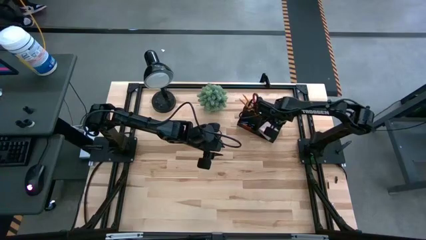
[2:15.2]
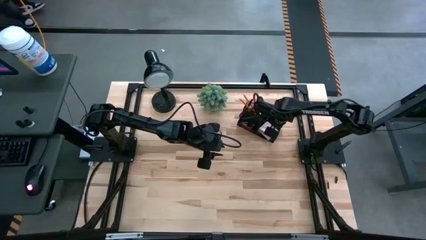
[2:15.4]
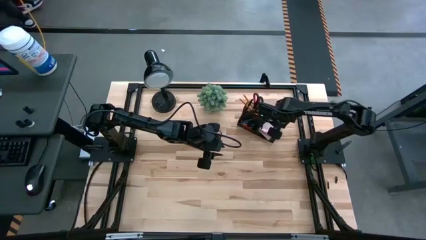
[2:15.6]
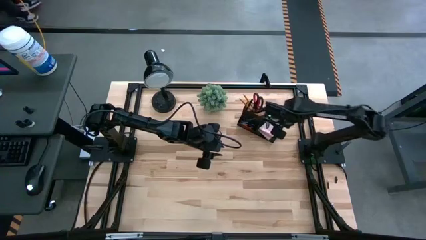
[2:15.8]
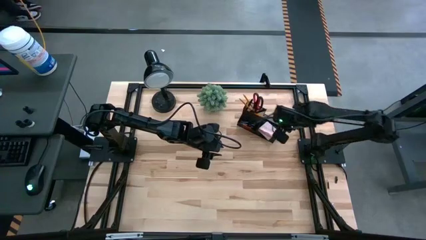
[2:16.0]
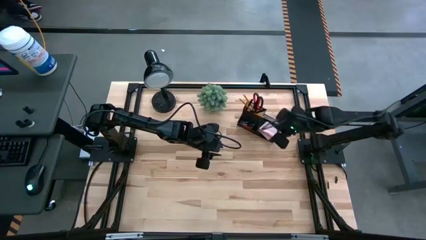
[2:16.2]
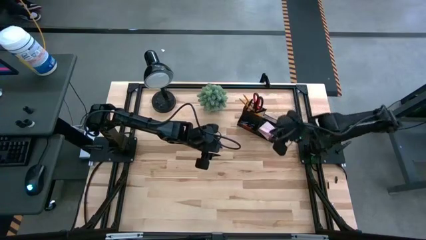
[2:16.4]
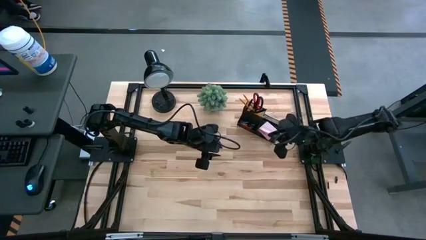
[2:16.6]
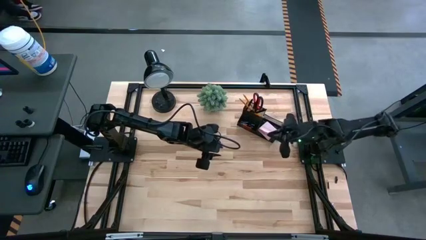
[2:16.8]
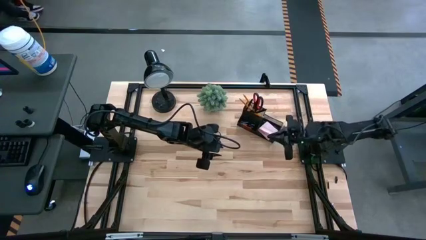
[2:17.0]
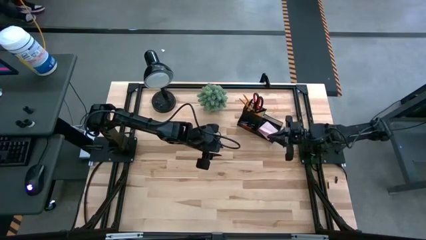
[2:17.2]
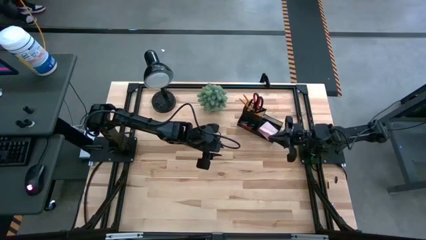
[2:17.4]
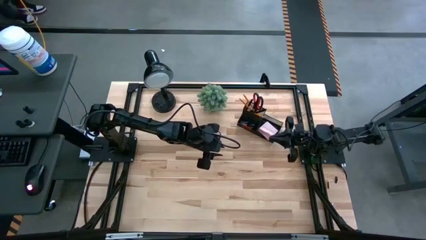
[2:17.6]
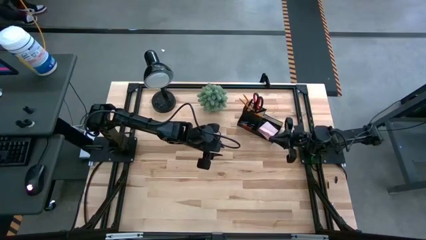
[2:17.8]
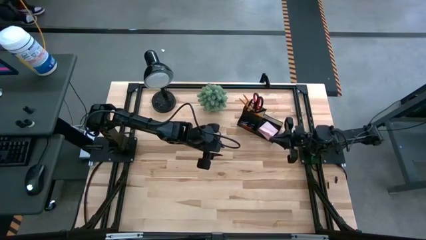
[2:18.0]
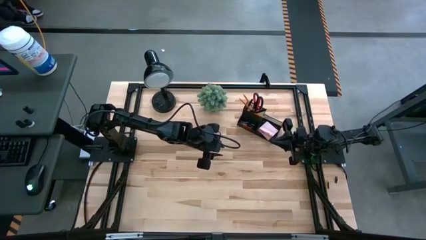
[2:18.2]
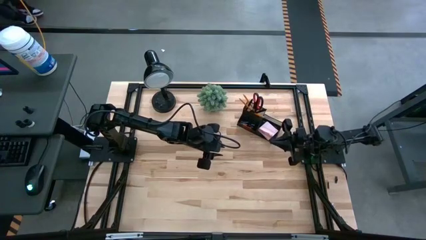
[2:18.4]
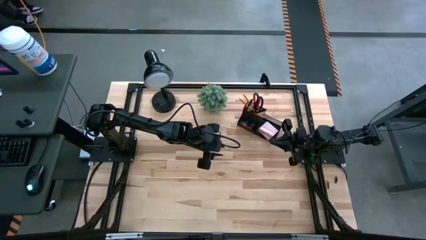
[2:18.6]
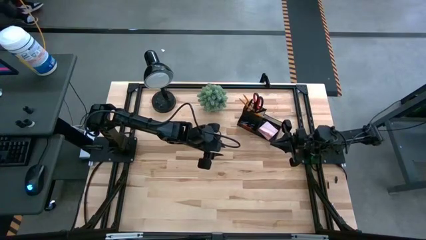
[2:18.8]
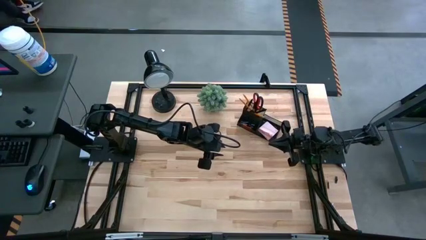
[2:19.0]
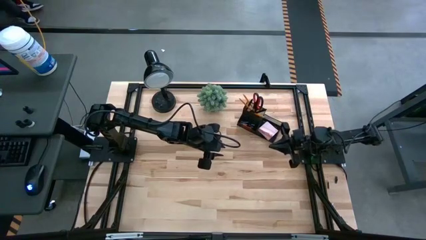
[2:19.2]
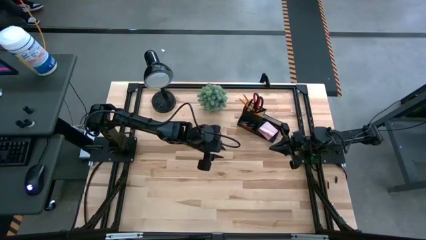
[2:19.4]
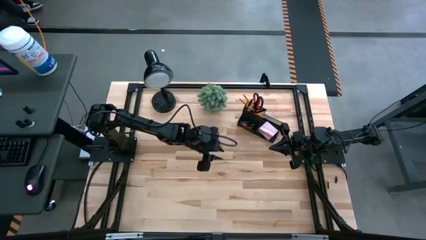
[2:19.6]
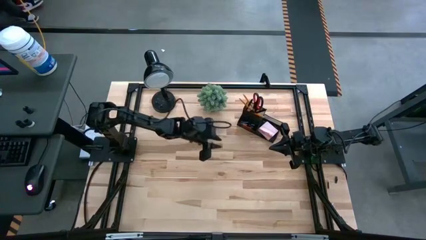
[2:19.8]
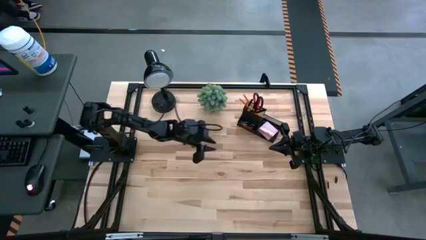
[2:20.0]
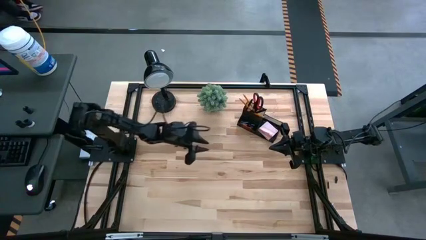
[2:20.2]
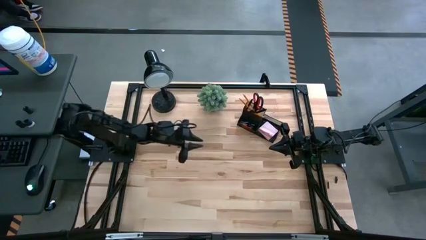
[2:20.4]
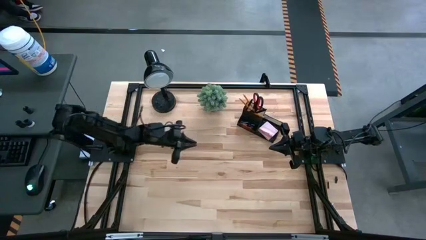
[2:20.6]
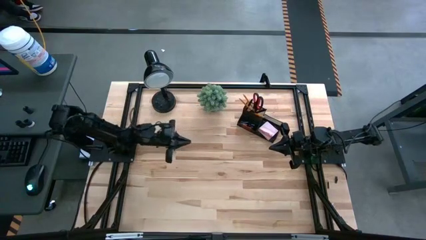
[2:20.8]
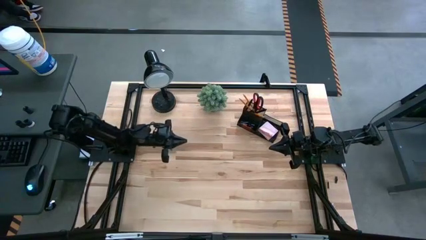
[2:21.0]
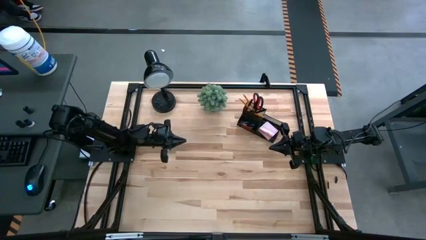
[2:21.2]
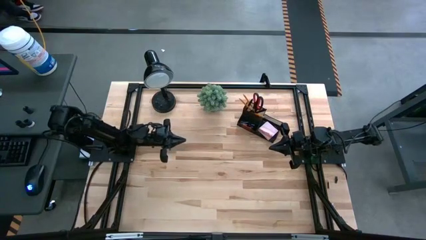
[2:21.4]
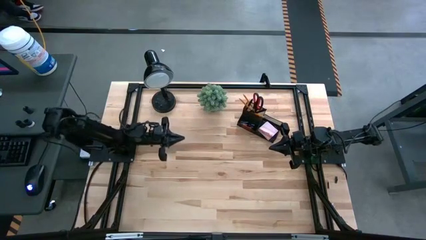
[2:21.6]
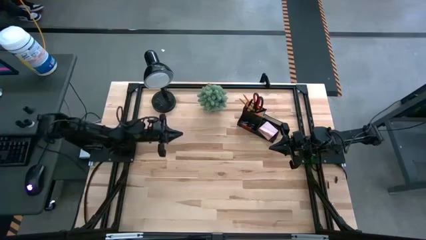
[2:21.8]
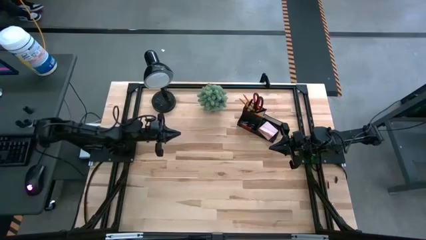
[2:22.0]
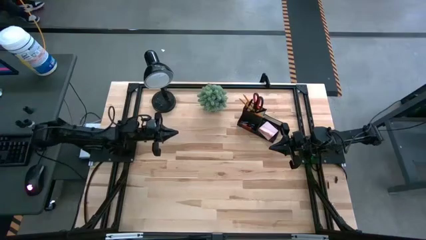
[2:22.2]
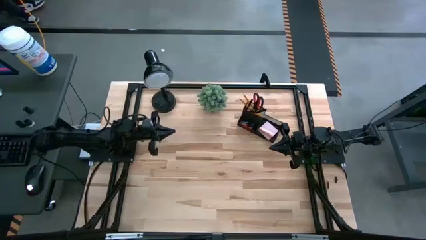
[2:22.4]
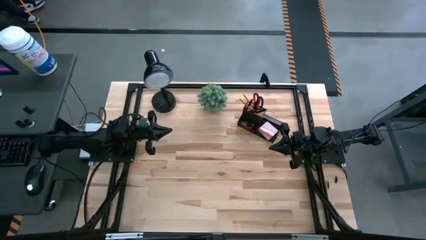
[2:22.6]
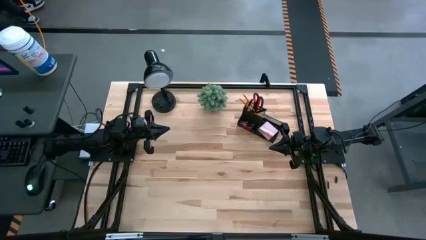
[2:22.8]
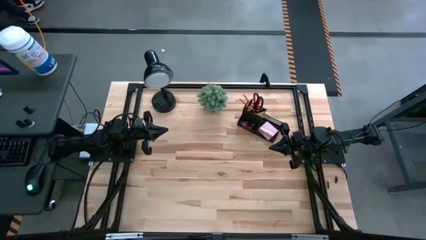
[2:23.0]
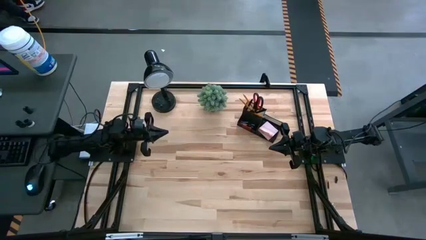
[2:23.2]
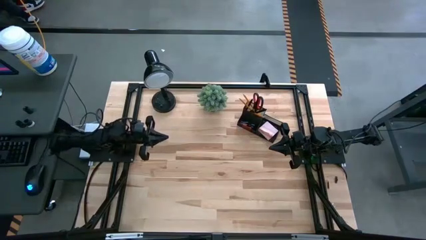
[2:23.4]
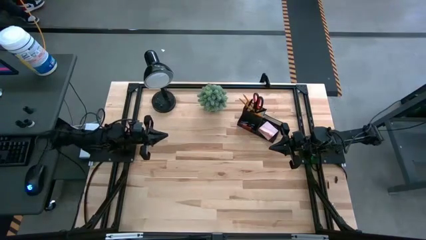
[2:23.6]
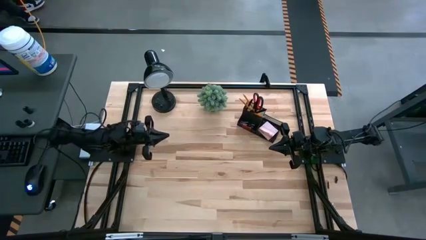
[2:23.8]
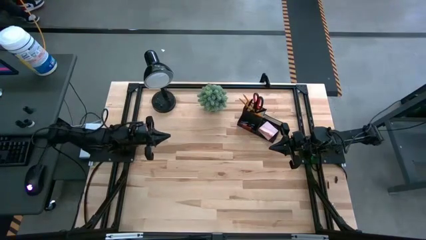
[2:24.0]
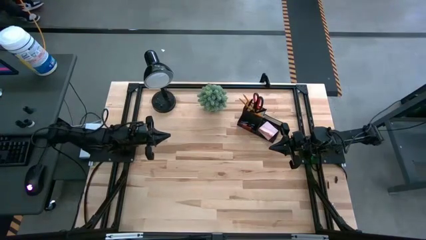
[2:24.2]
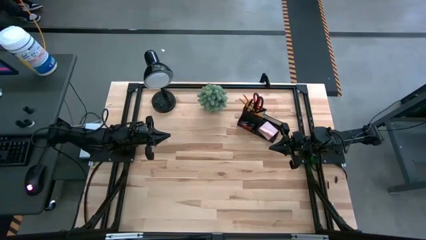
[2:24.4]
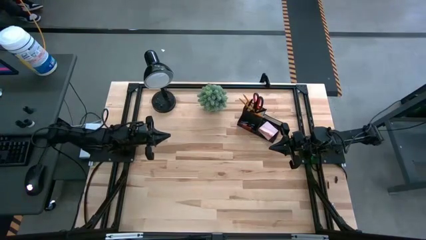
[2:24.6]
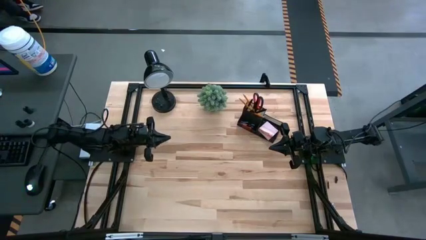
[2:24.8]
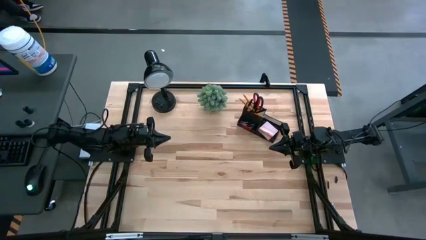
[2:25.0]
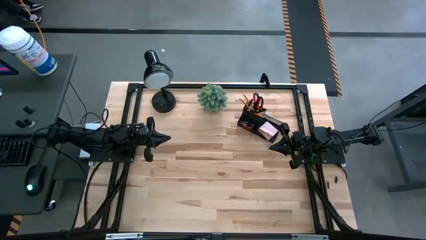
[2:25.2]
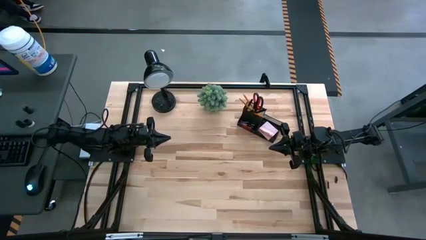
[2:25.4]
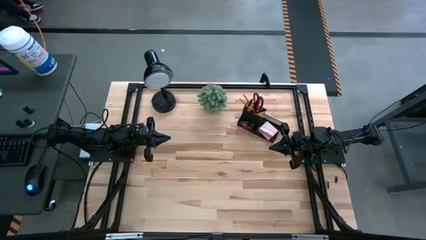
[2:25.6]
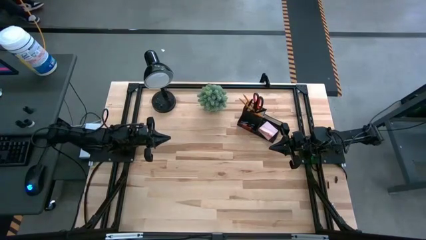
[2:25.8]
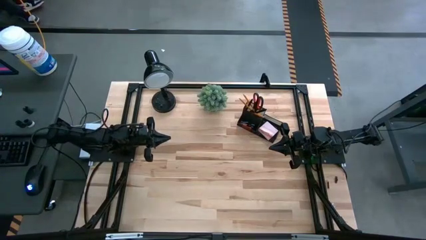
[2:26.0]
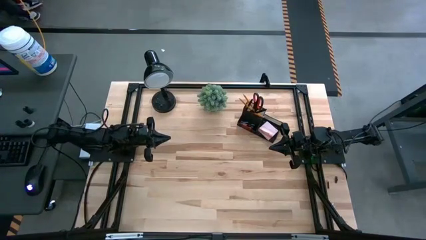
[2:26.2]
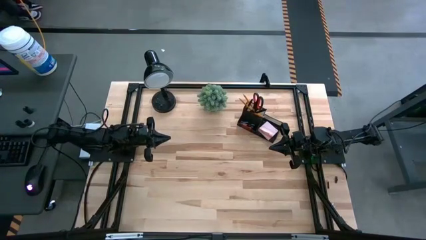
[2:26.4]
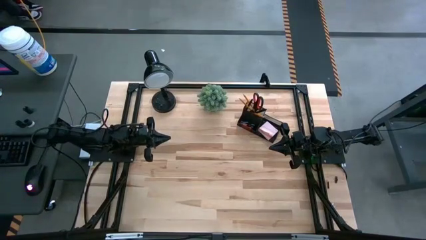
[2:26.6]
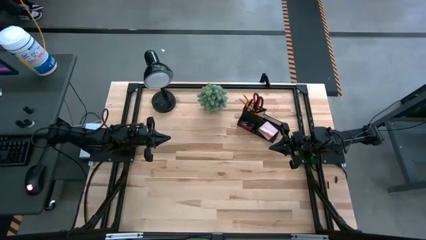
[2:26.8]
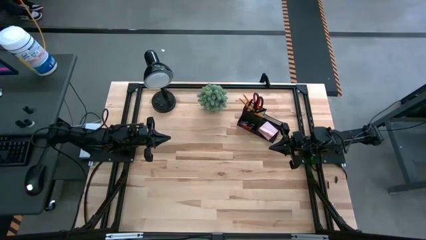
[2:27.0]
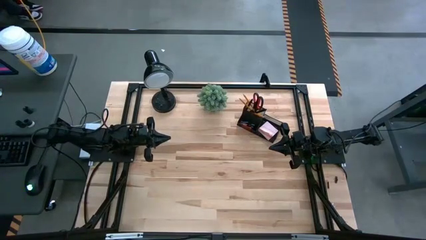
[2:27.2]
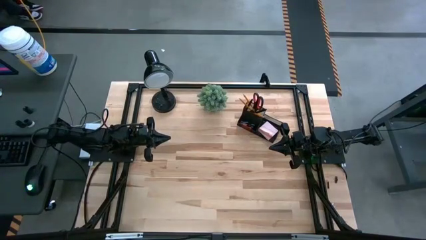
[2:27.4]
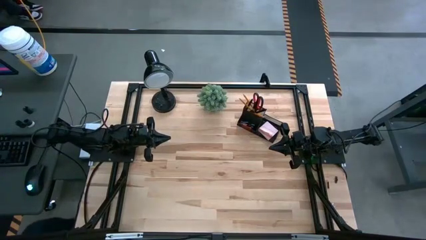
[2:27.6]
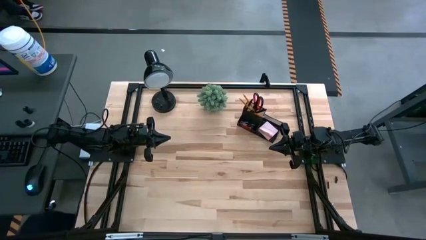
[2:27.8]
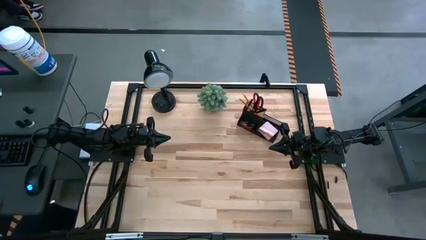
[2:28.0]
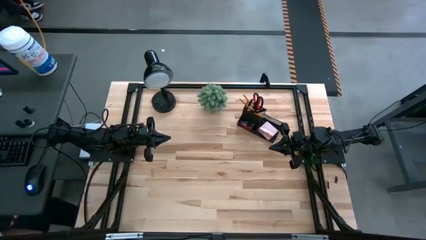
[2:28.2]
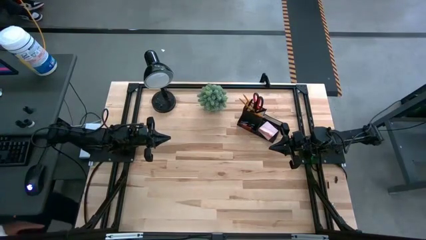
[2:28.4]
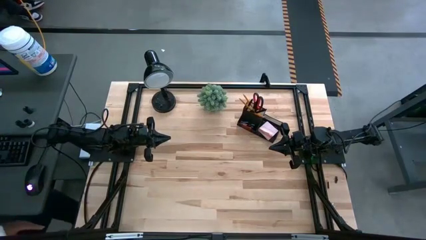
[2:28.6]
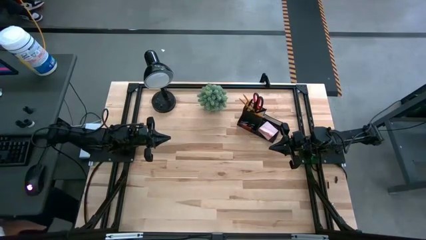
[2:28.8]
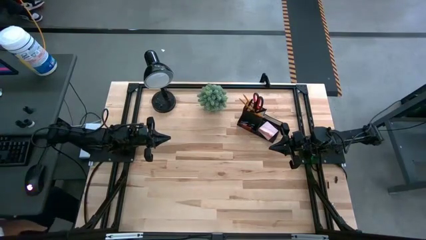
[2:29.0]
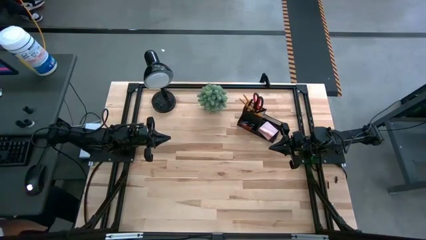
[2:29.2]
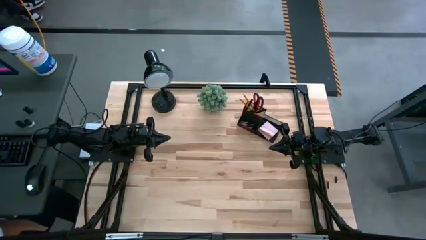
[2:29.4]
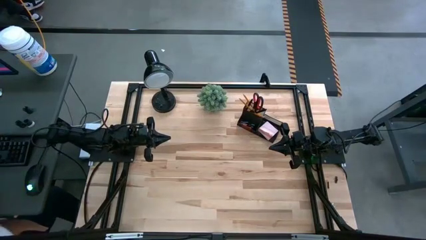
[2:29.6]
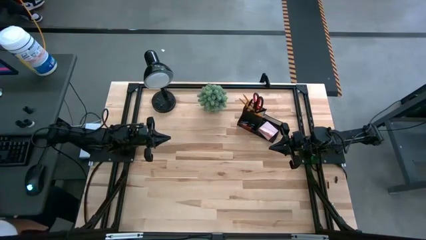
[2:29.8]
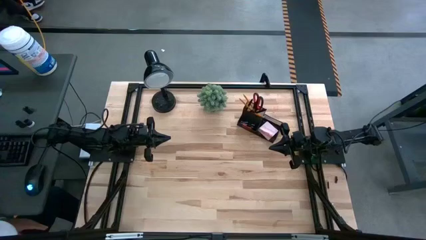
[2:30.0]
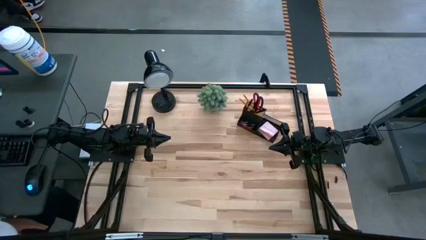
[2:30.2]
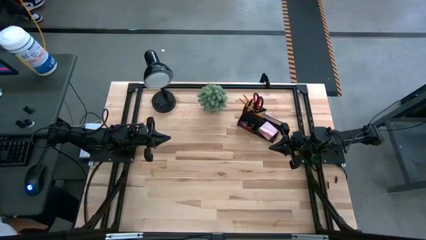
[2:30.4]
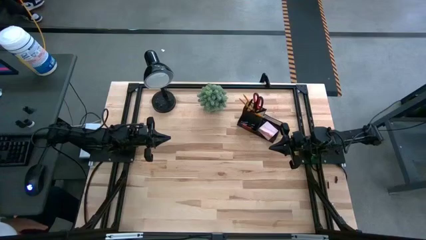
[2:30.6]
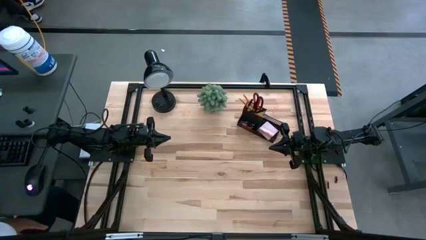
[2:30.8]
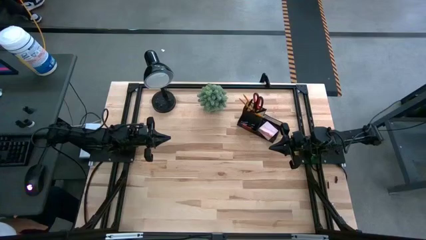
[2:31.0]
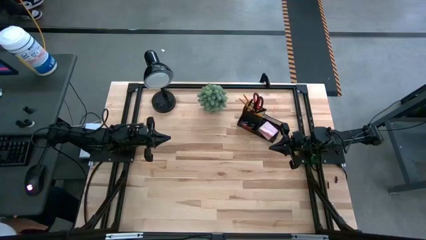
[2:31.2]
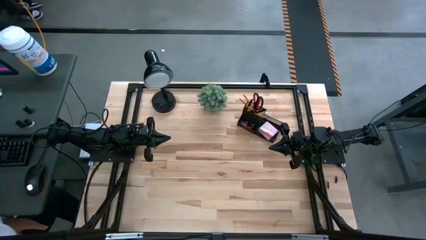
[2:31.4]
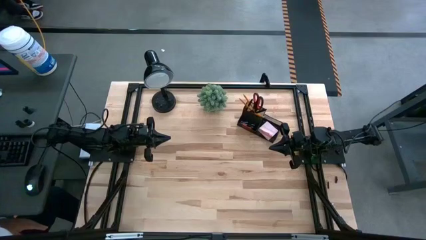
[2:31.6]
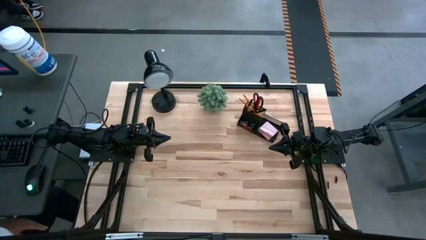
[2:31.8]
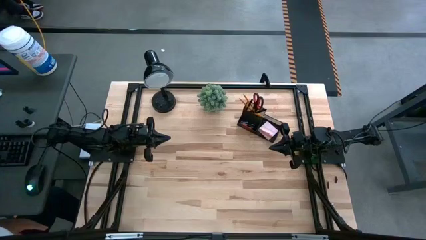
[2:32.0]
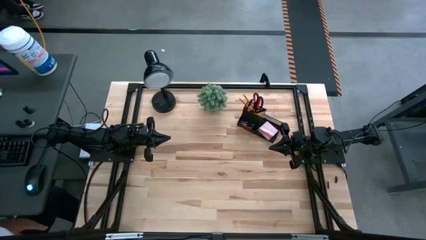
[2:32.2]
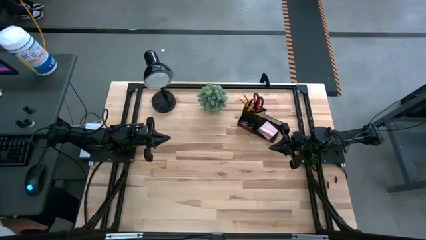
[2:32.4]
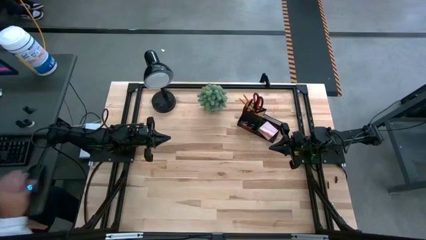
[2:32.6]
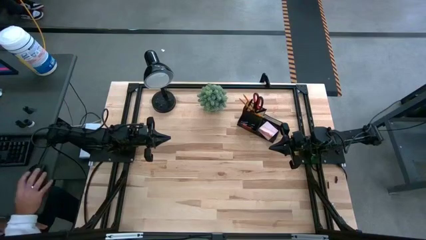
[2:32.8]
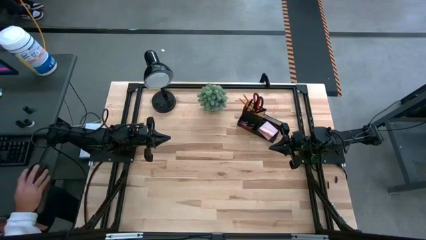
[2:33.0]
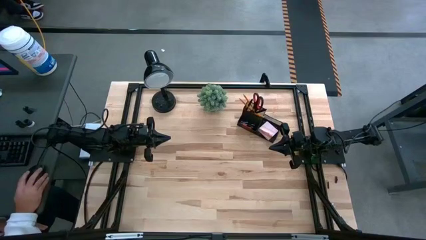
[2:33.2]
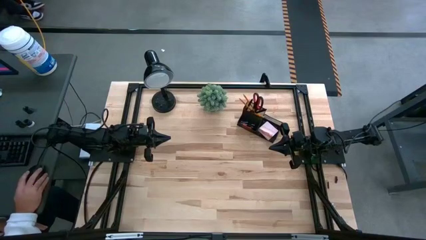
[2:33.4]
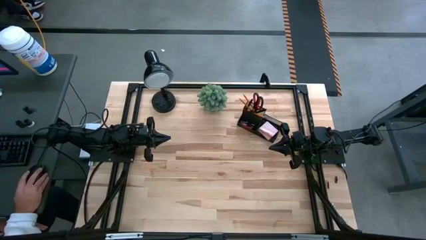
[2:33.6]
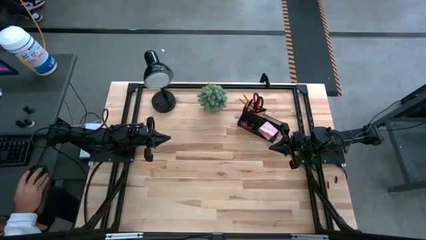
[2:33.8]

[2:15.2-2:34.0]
Task: Pick and place office supplies into organizer
Return to Home Position
